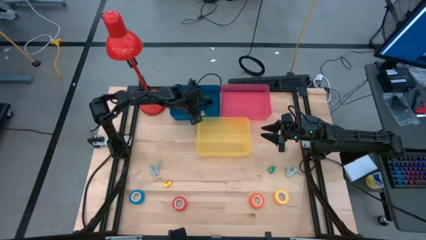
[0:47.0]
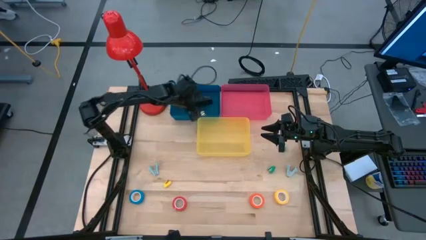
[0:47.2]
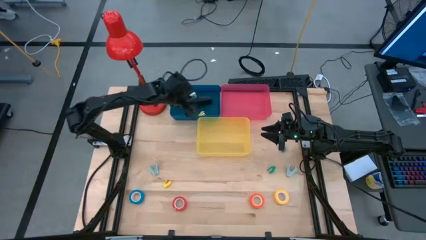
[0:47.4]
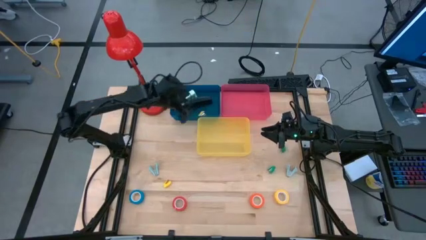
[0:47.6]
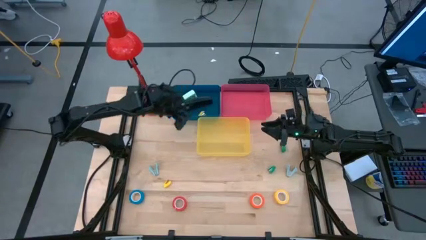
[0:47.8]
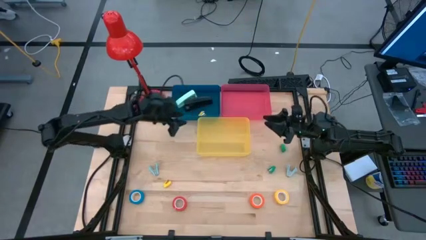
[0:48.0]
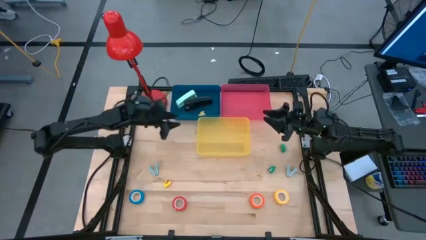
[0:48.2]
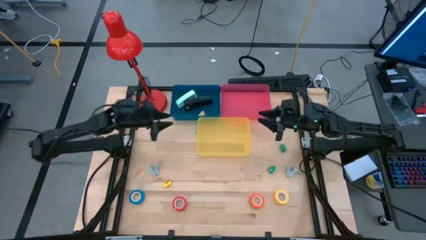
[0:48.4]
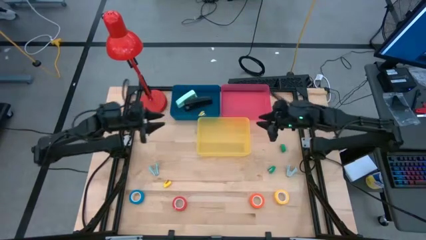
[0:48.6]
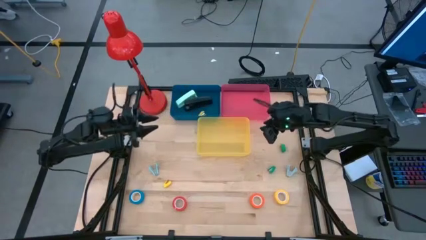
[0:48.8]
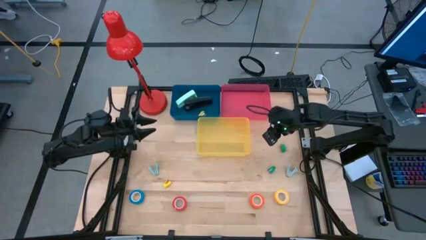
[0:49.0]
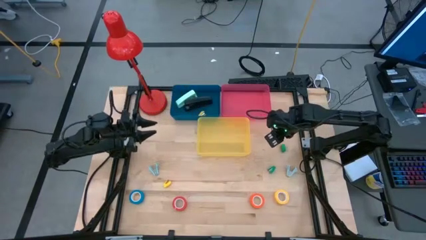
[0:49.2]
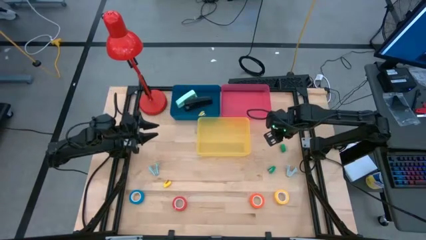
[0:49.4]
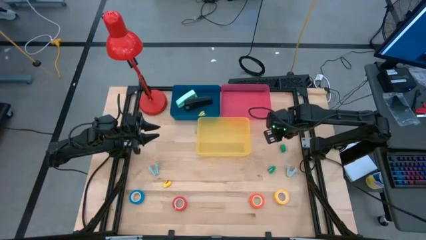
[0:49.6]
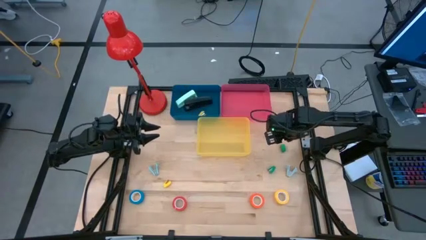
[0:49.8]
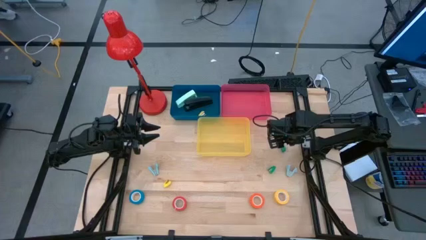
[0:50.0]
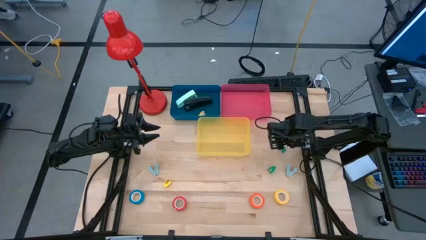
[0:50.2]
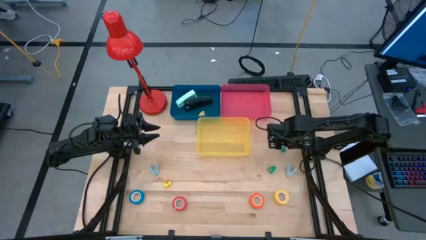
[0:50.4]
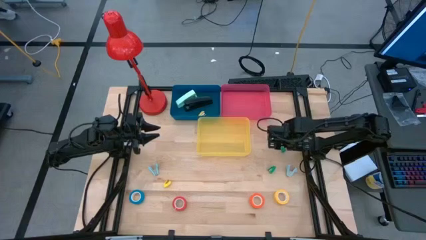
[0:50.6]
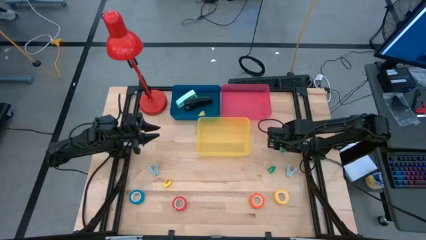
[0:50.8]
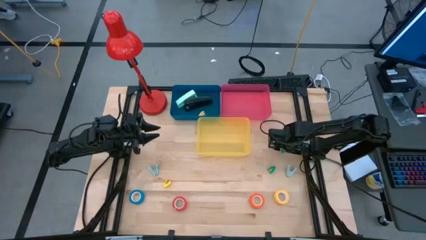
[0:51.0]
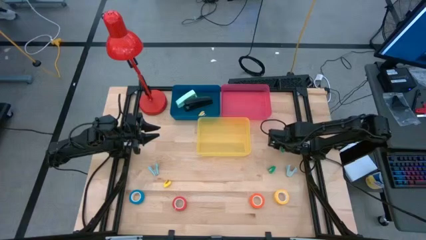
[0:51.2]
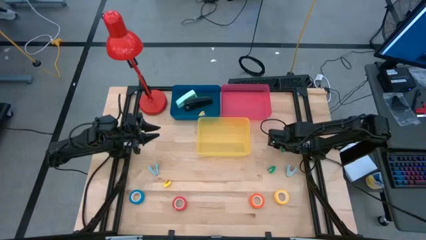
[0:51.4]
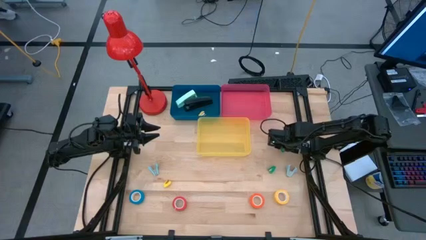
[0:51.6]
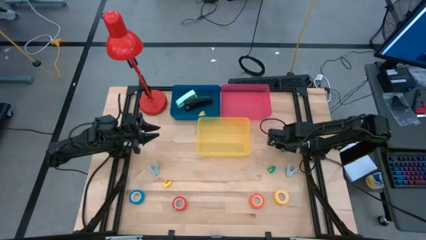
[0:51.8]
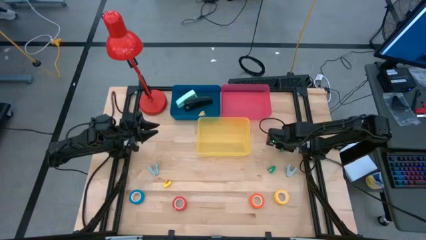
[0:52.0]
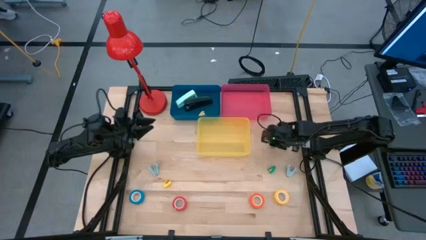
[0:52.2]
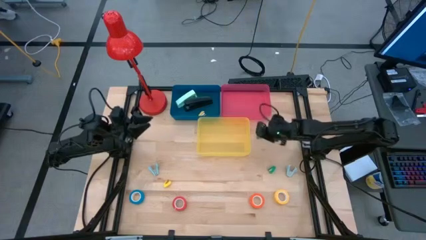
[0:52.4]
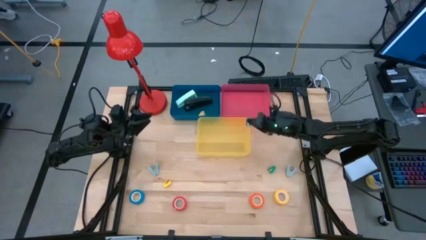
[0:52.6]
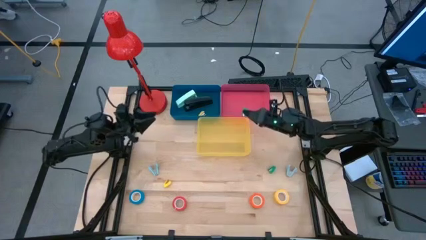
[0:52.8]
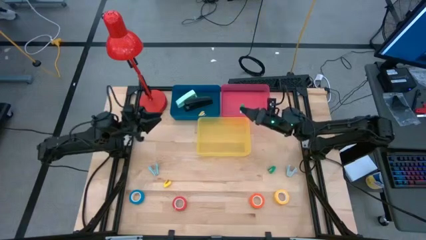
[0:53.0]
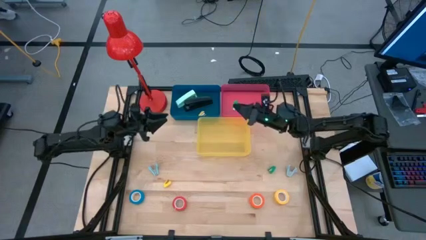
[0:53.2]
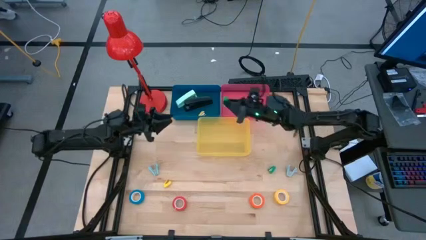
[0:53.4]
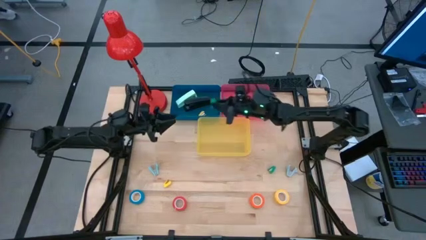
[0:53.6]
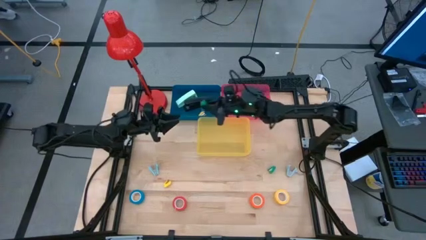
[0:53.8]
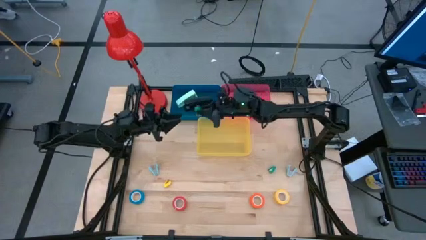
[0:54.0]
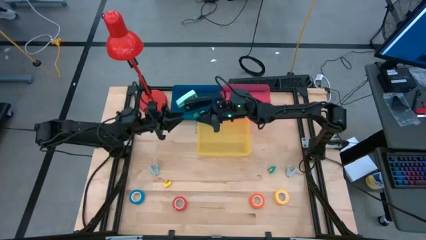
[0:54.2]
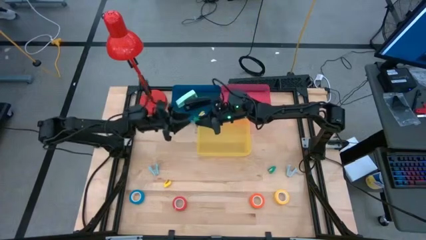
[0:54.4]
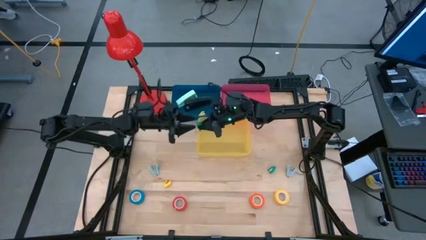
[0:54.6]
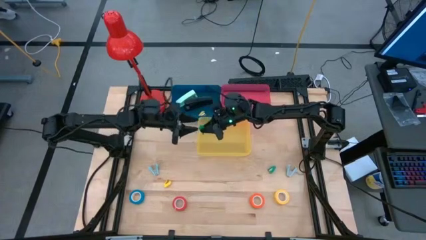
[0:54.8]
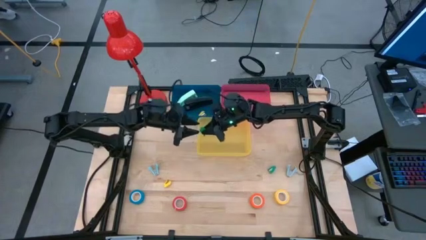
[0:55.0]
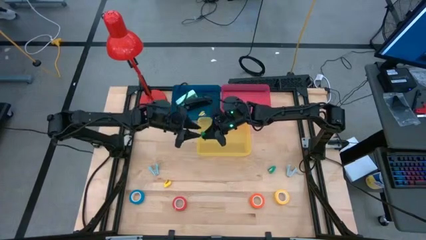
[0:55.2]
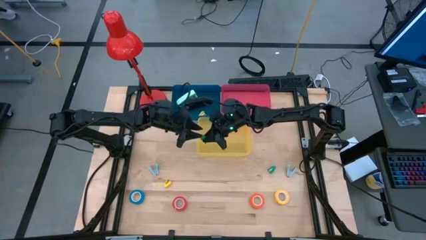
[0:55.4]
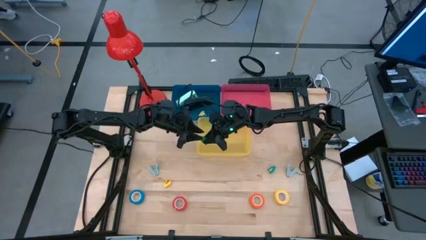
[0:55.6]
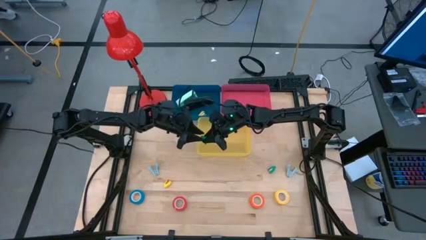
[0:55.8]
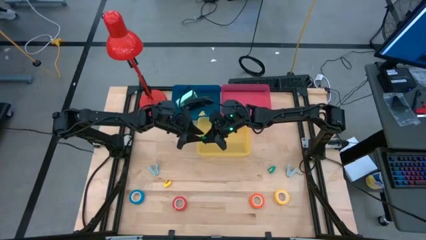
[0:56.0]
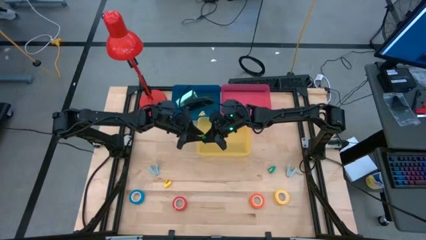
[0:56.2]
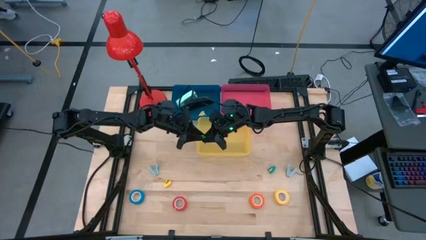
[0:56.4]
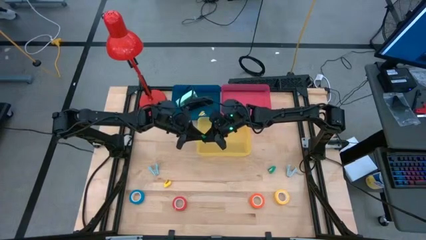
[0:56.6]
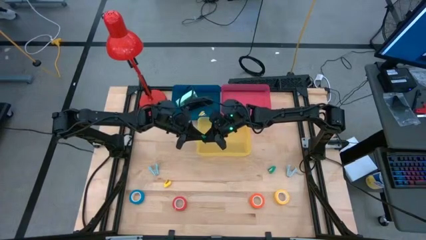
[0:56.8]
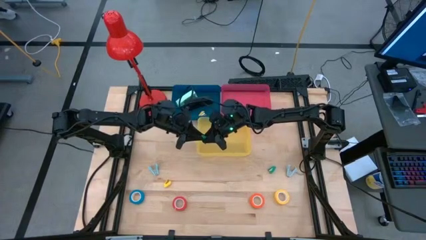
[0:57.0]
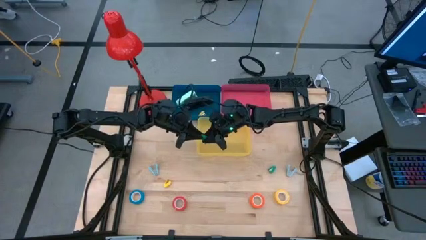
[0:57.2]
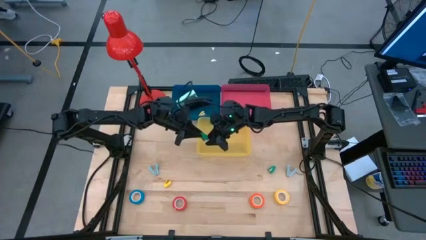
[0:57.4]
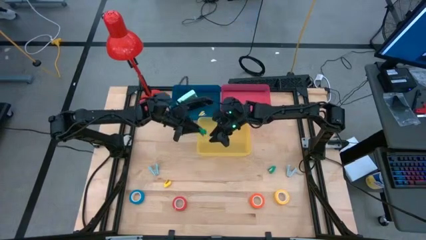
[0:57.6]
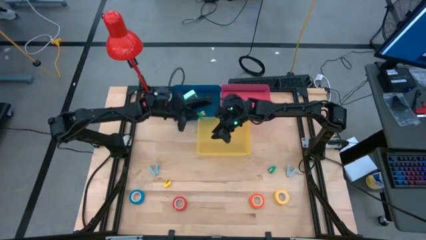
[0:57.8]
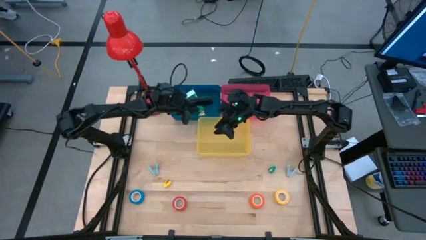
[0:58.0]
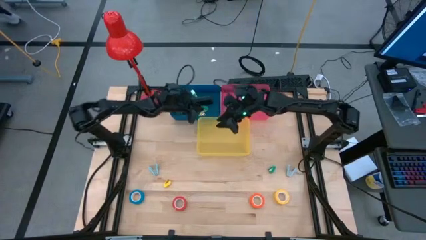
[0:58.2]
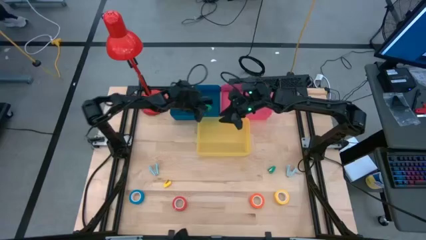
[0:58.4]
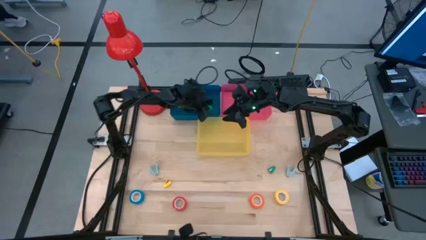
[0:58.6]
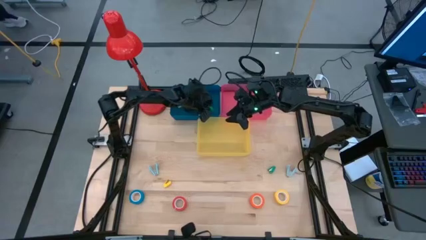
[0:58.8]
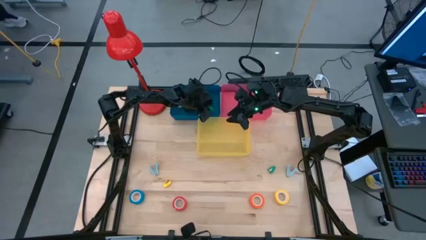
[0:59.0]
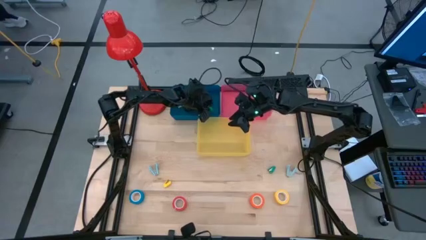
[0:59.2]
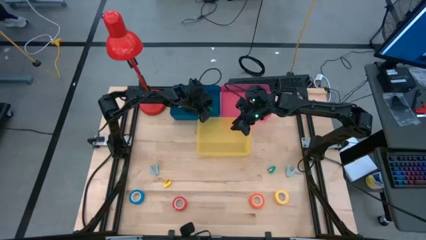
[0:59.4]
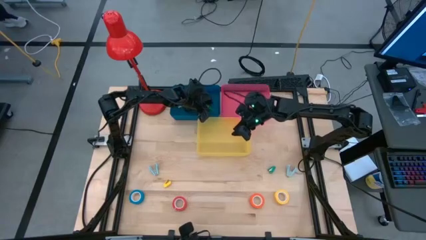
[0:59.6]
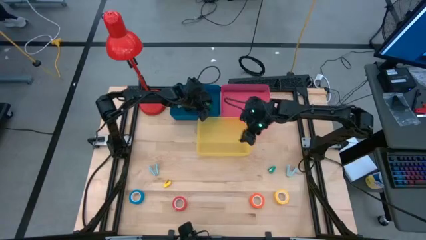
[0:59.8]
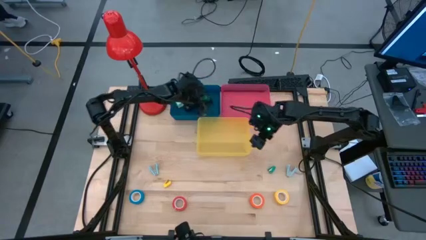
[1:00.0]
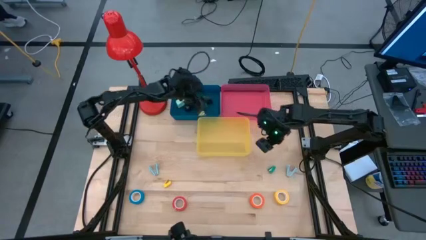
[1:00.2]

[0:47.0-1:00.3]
Task: Pick and place Stapler, Stapler remover, tape
Put the green stapler into the blue bin
